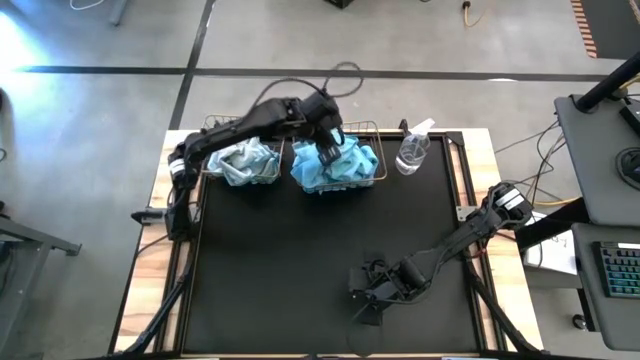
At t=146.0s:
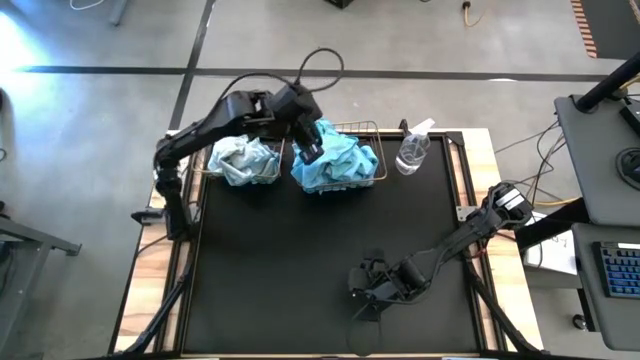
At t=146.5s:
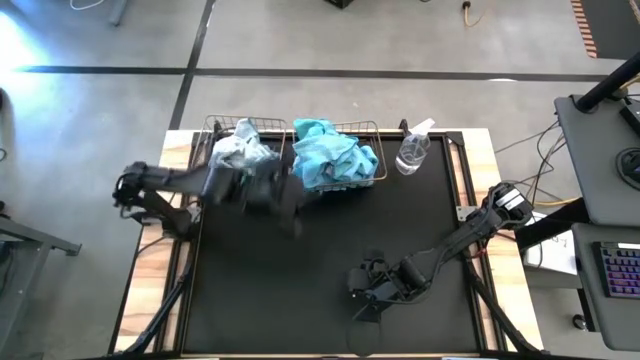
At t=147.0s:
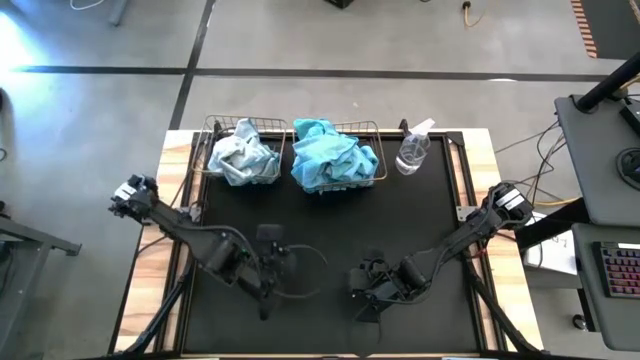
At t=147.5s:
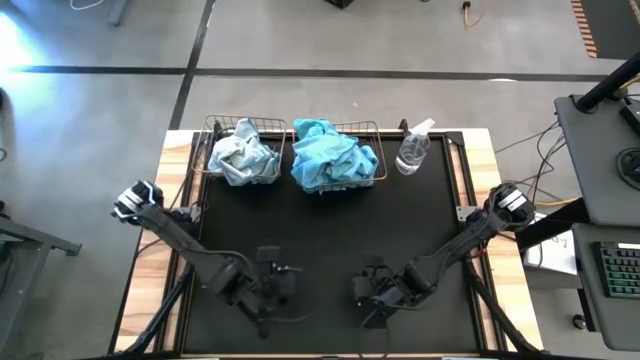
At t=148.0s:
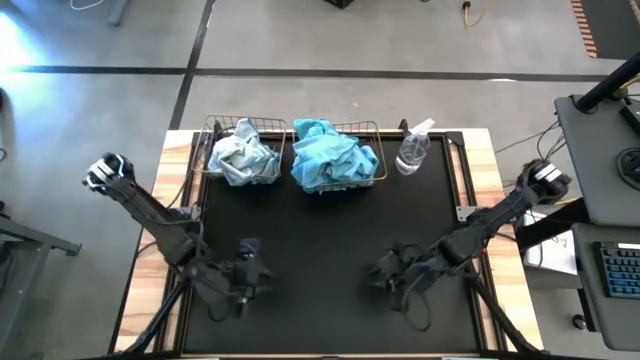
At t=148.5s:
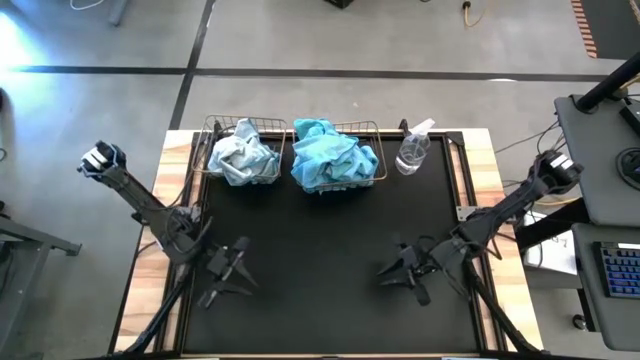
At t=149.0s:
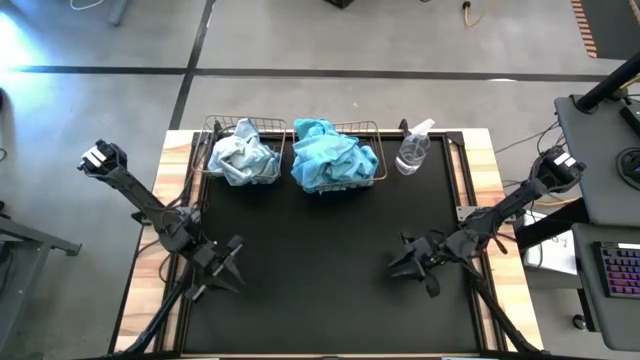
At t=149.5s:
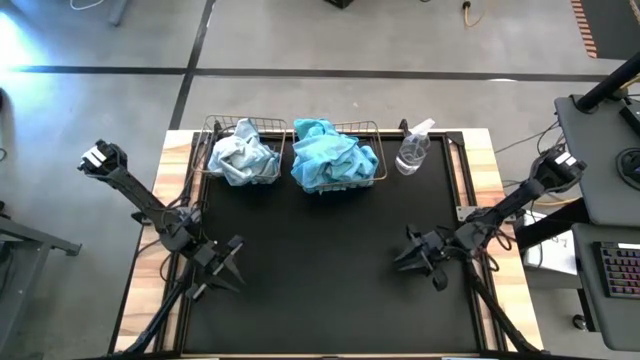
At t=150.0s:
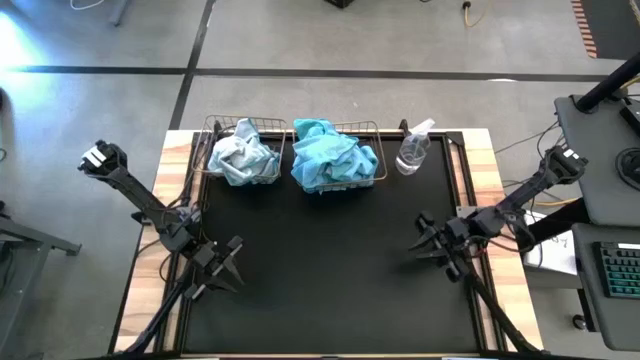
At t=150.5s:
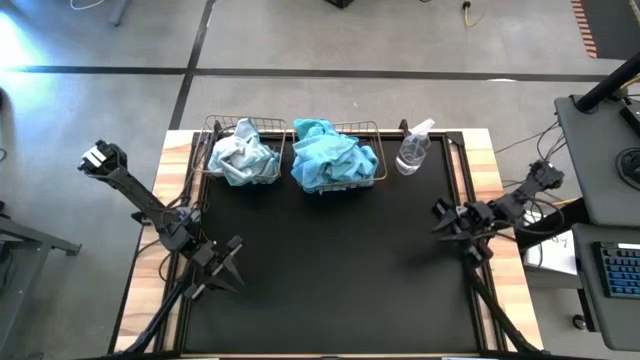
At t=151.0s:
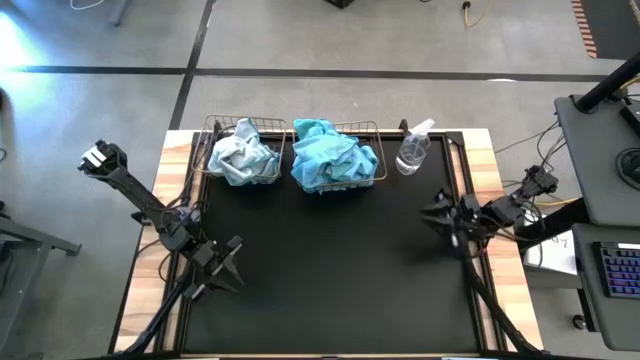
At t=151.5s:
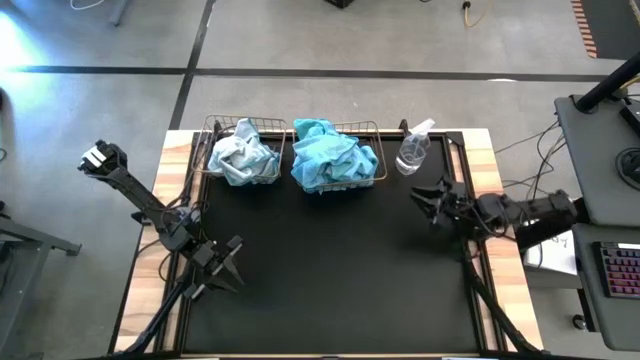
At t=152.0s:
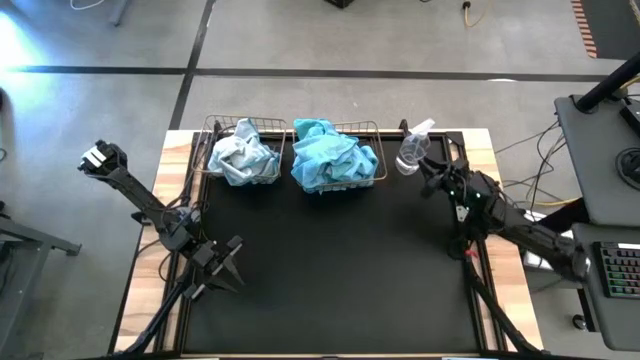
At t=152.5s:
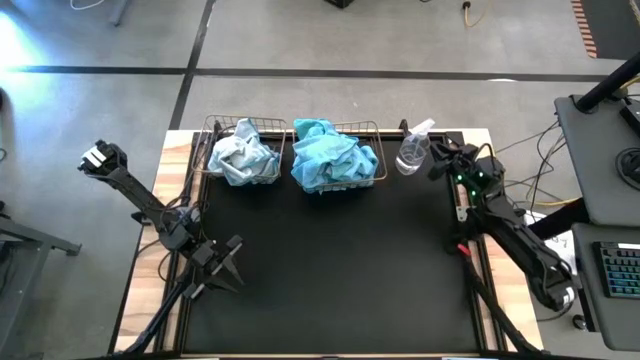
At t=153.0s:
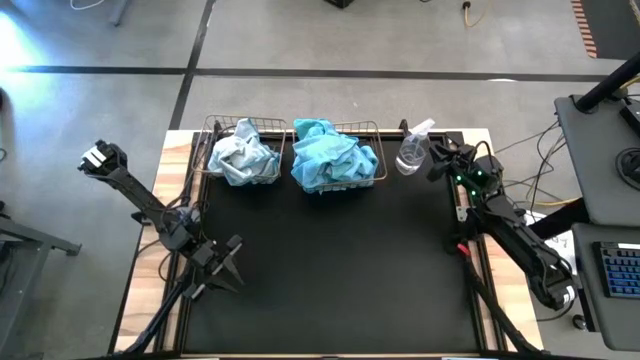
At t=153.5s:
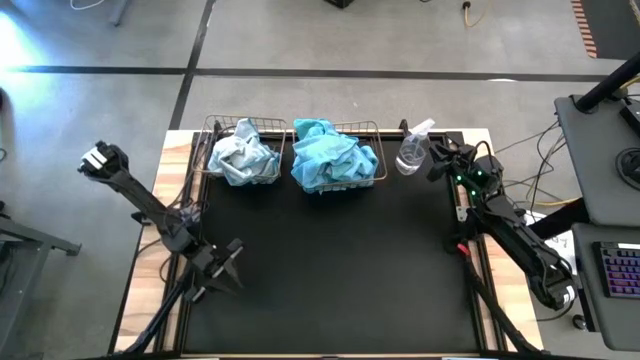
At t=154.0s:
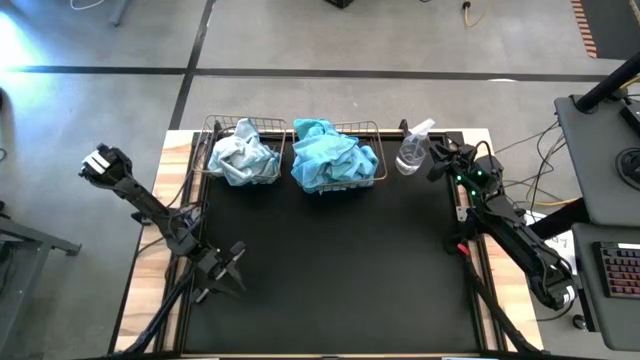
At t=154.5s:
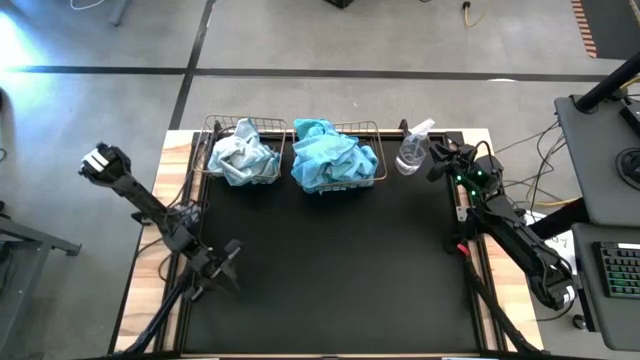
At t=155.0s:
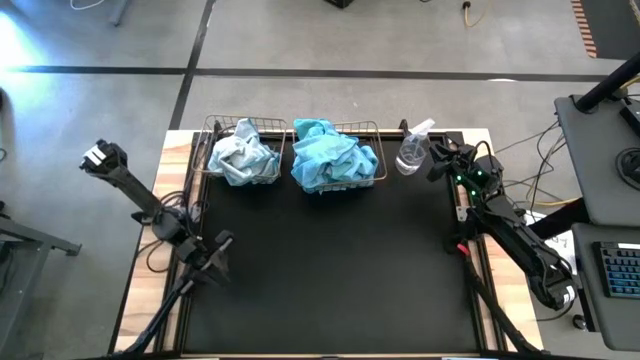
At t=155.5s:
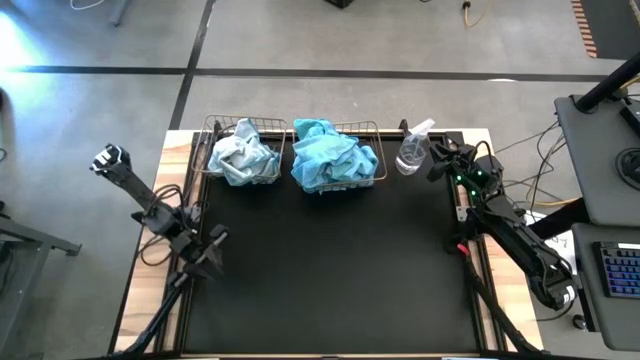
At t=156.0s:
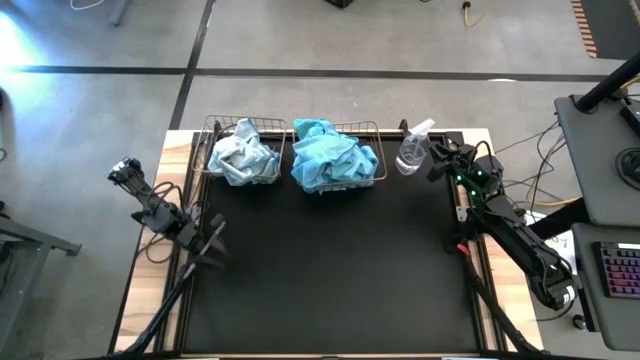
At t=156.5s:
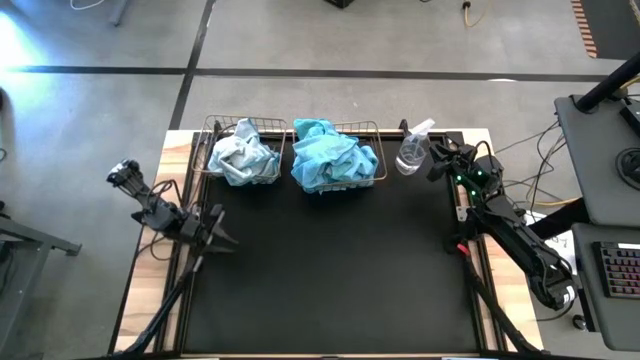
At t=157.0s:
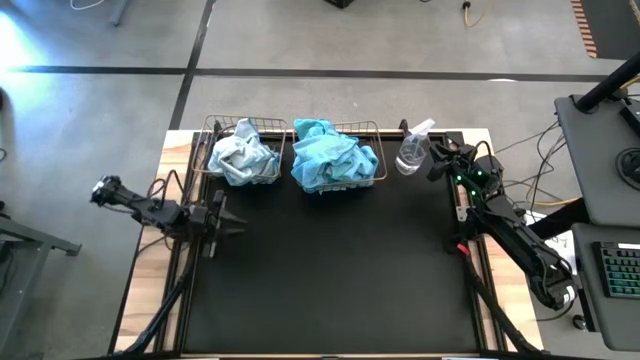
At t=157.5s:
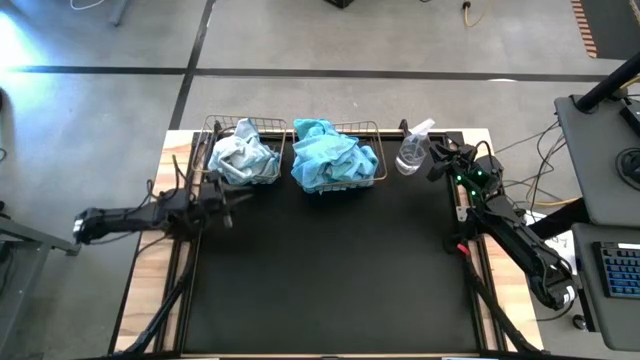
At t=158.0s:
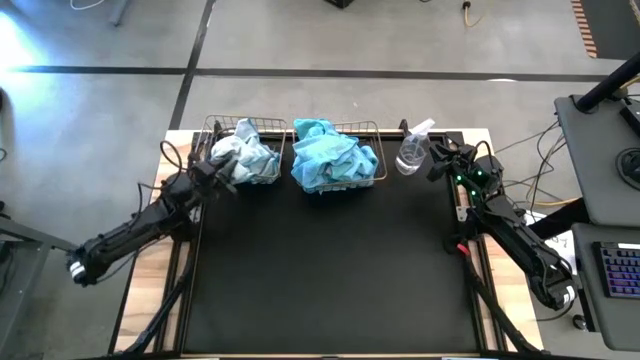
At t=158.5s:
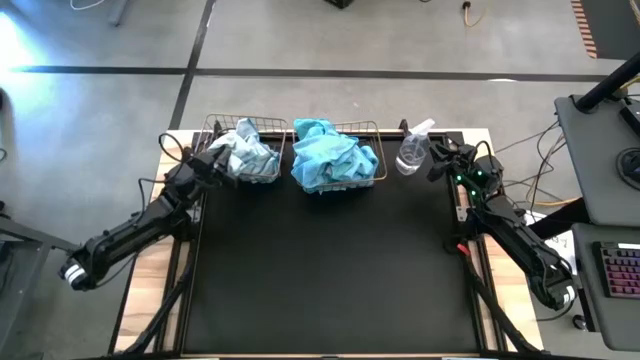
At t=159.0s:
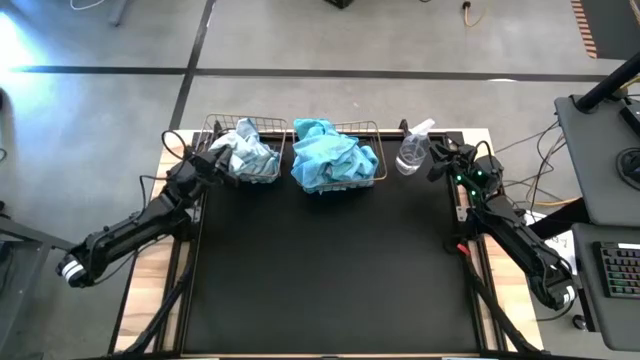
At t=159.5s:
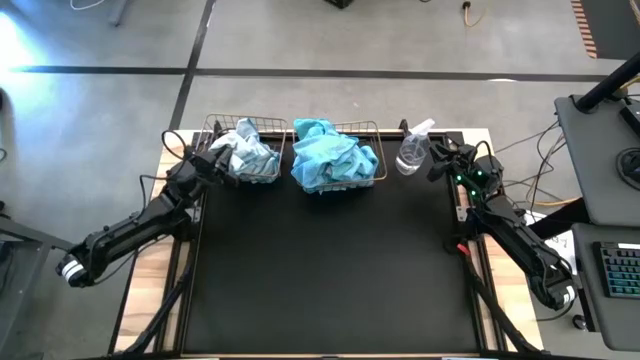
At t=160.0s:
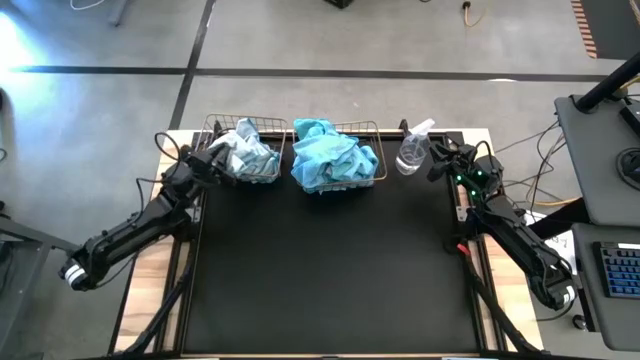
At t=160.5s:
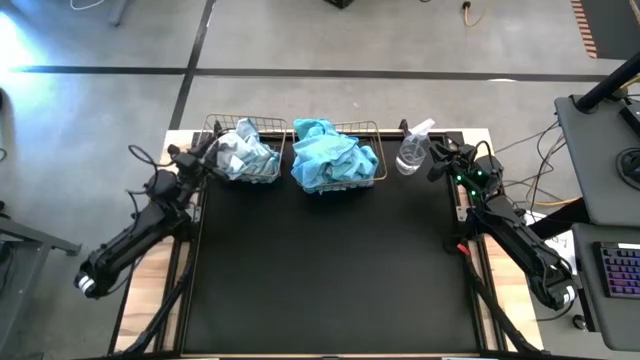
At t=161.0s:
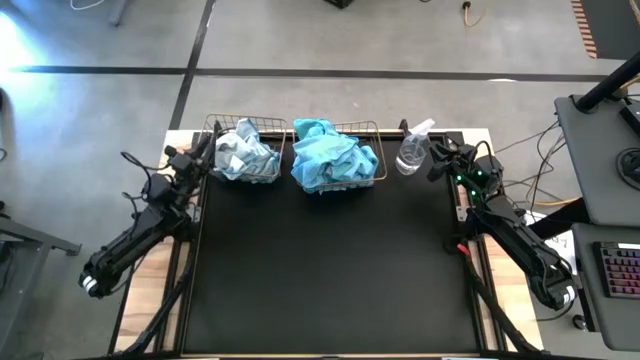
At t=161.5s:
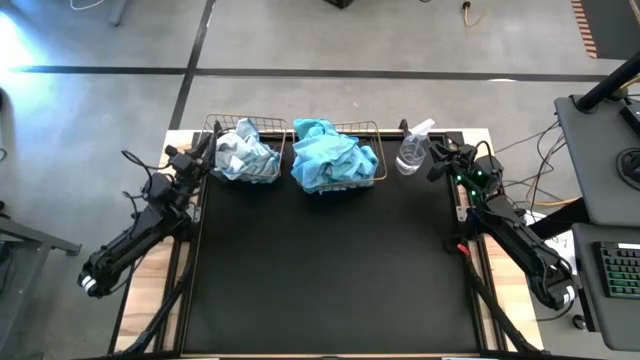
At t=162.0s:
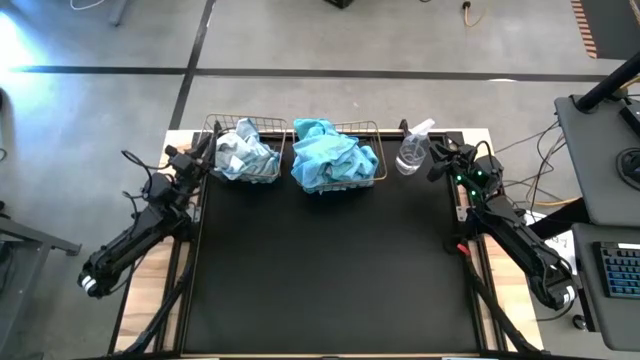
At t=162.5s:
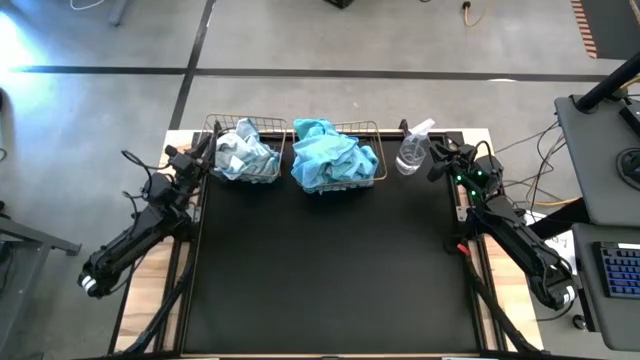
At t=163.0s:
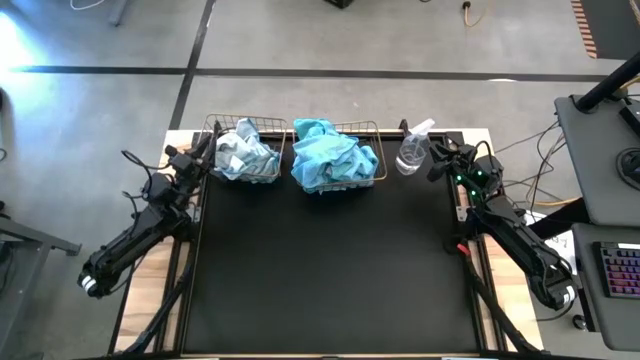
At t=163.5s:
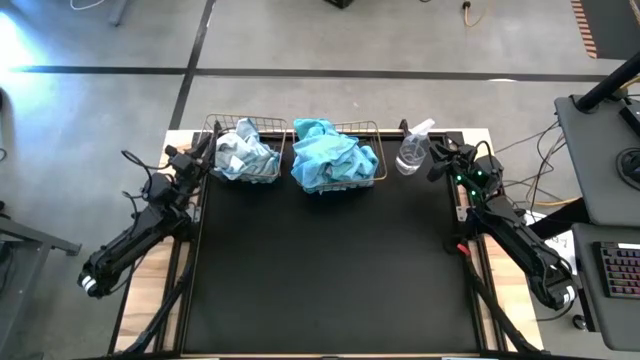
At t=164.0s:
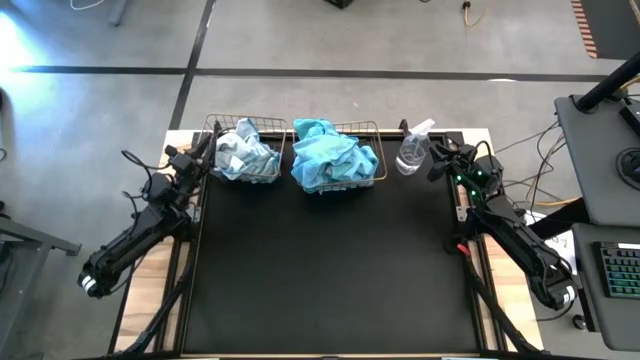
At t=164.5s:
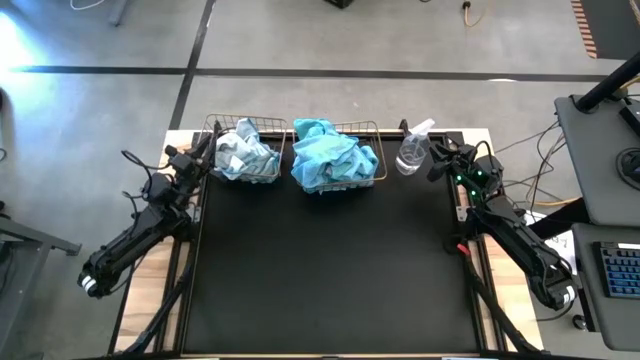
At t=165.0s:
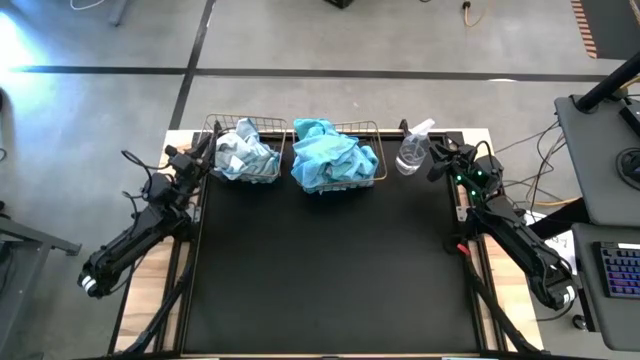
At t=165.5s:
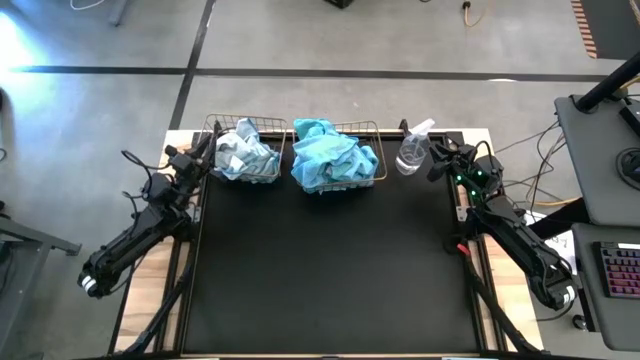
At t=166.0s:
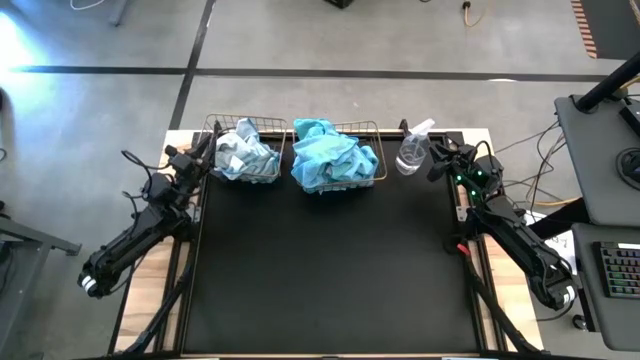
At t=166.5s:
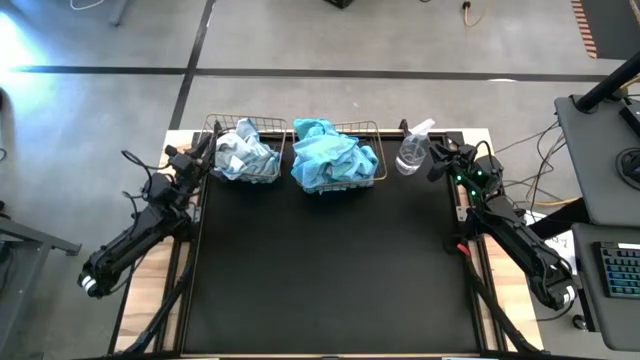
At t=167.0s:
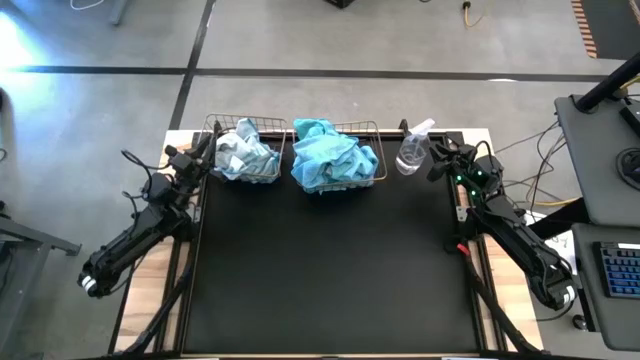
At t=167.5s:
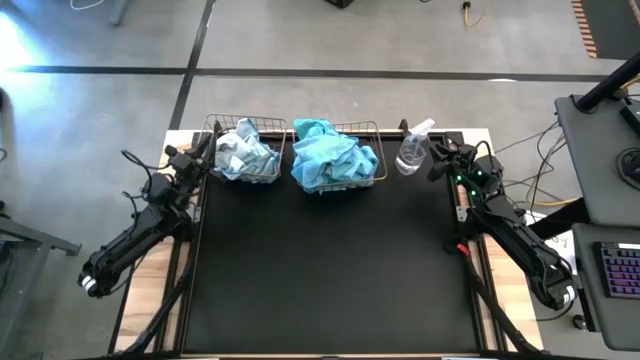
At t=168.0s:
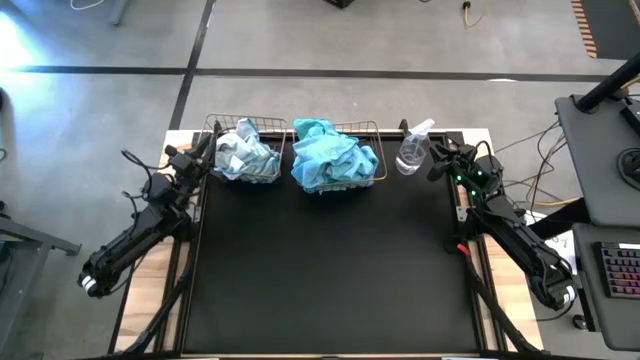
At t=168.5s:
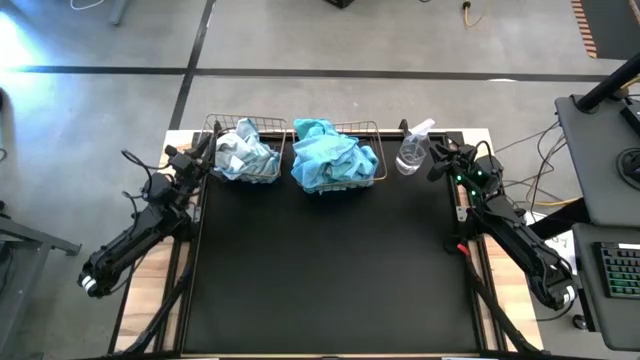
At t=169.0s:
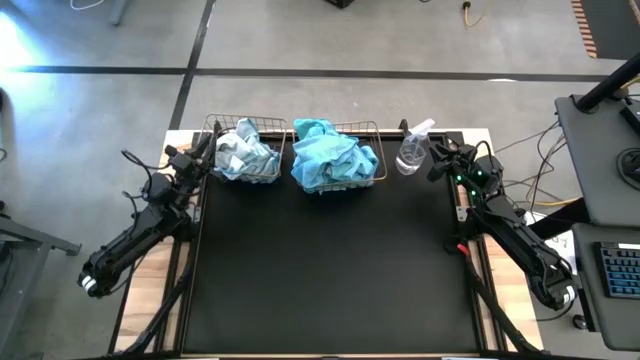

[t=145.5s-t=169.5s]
Task: Sort microfiber towel by color & place in baskets
Return to Home Position
